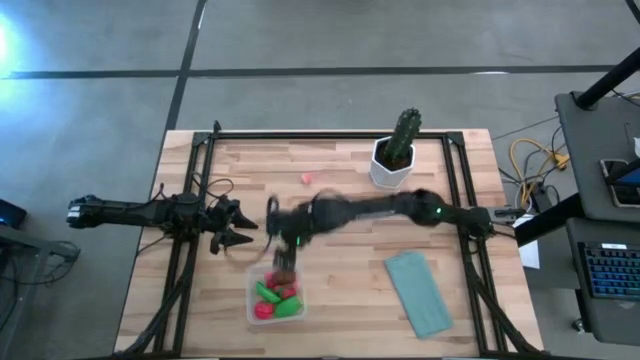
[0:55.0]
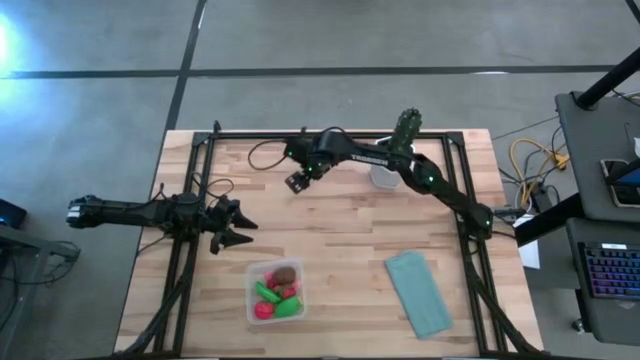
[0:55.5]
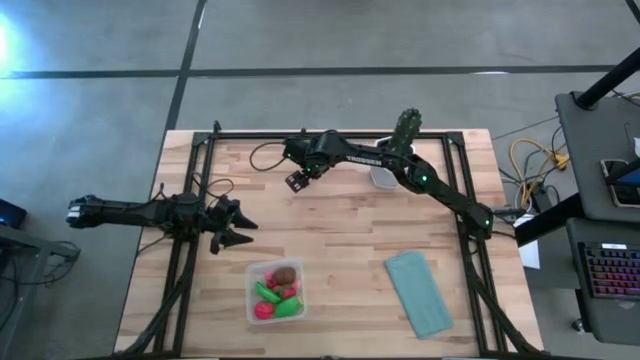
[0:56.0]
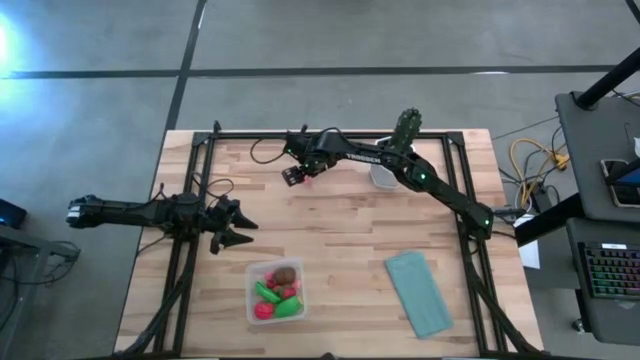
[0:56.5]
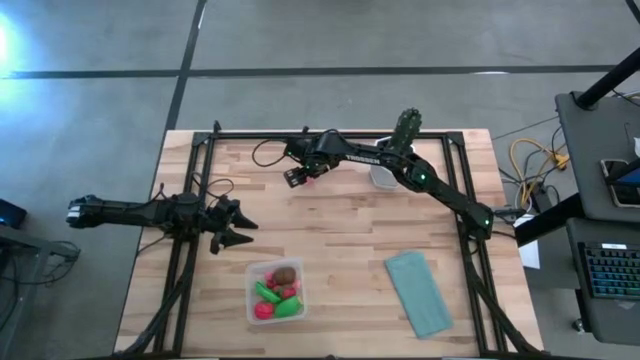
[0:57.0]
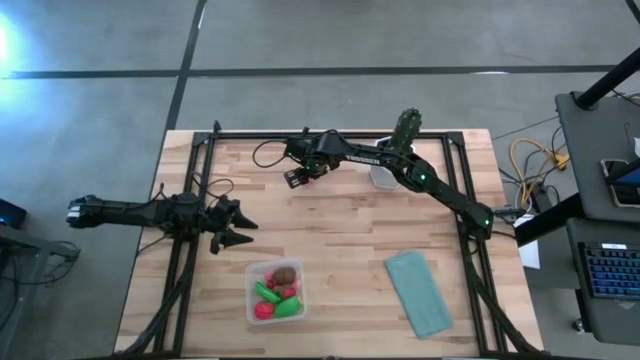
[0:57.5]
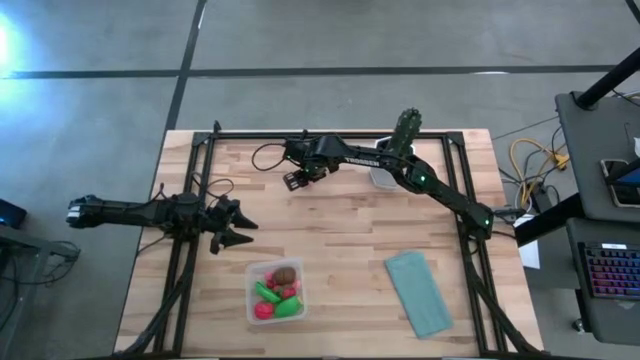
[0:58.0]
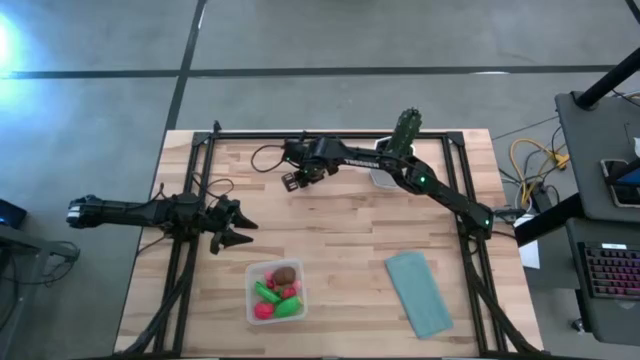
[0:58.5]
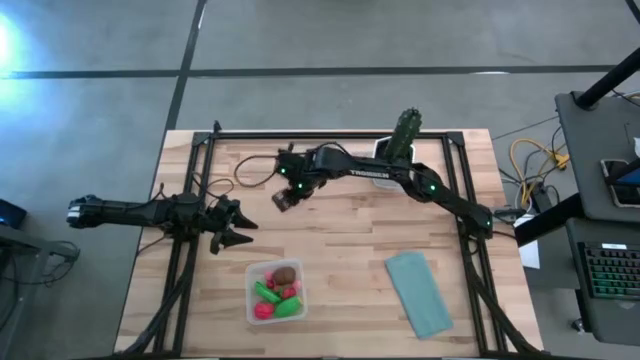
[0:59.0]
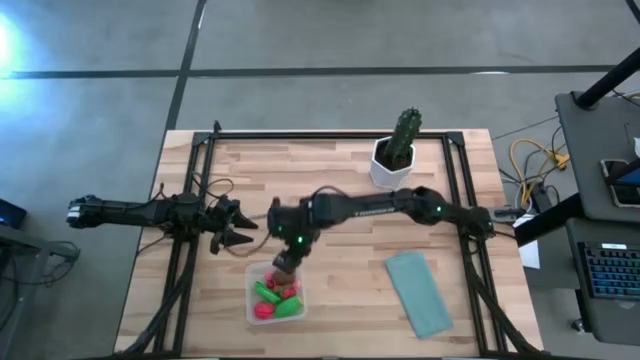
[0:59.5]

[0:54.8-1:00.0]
Task: Pick and placing Produce into tupperware
Put the pink peach into the transparent bin

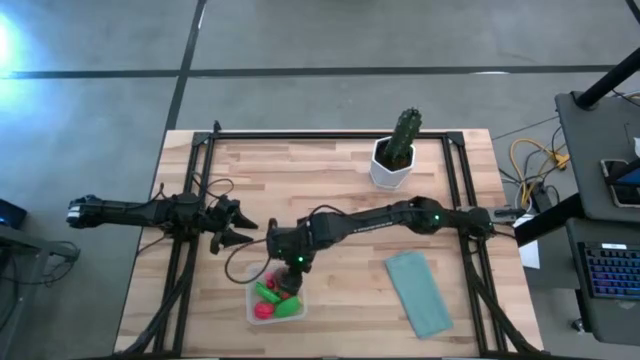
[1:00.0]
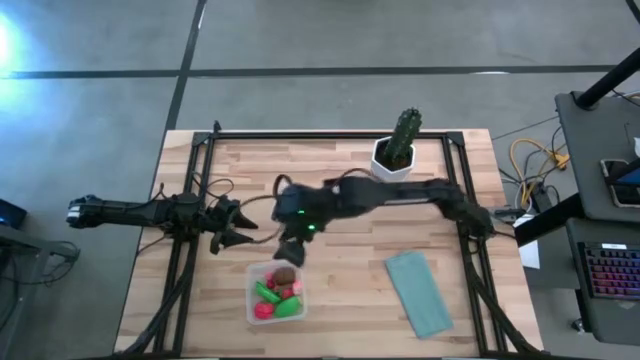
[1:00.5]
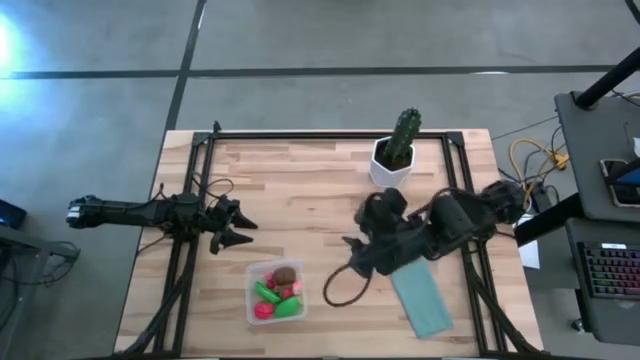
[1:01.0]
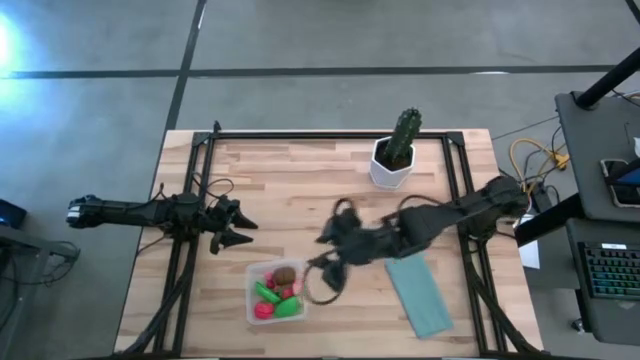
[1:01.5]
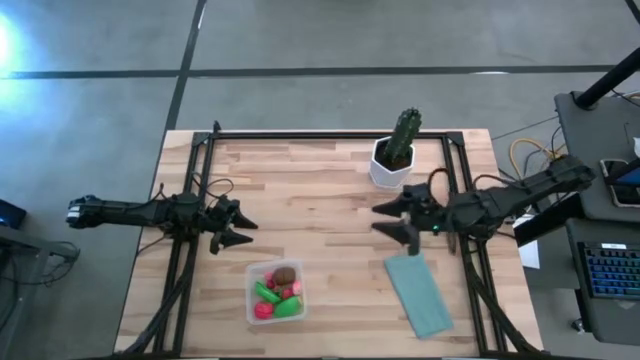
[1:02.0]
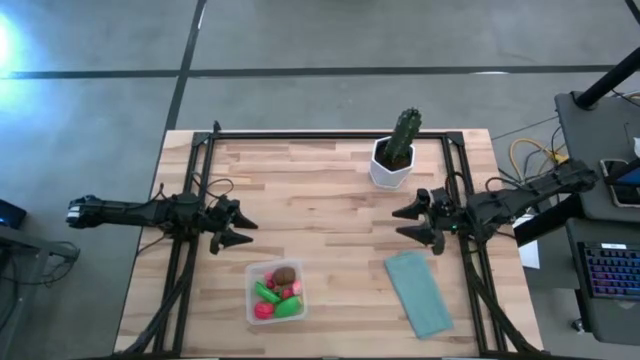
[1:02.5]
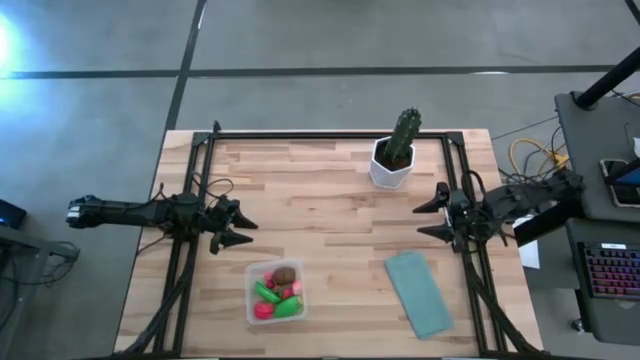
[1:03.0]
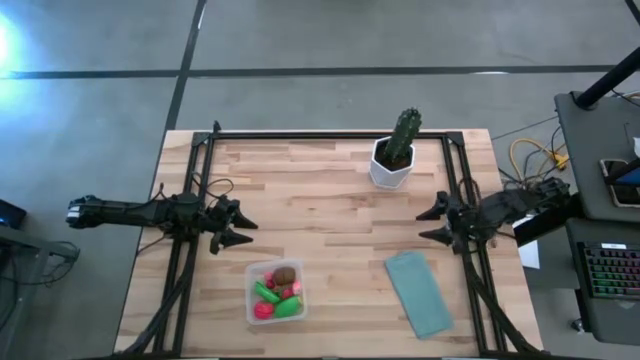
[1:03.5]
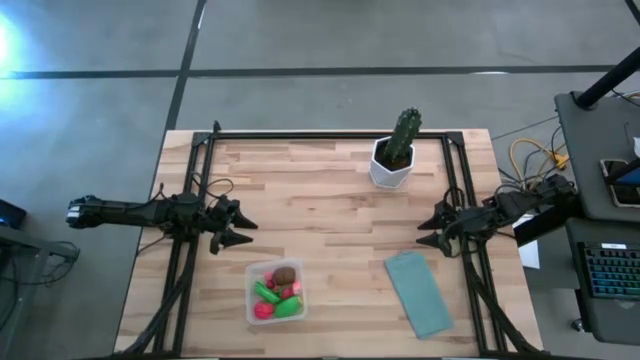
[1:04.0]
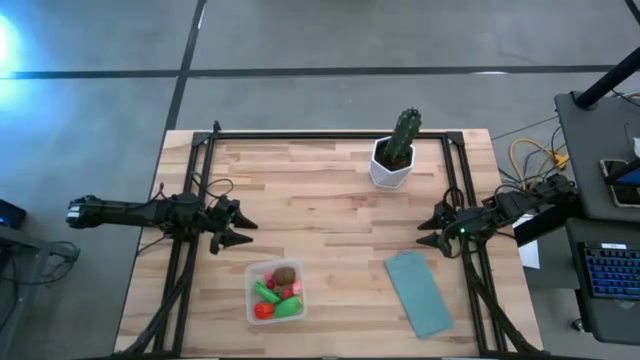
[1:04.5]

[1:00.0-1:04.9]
Return to Home Position

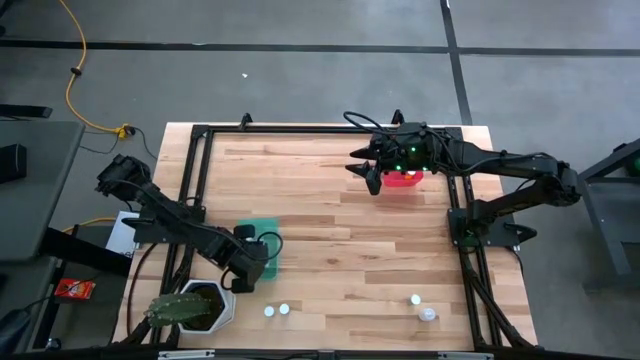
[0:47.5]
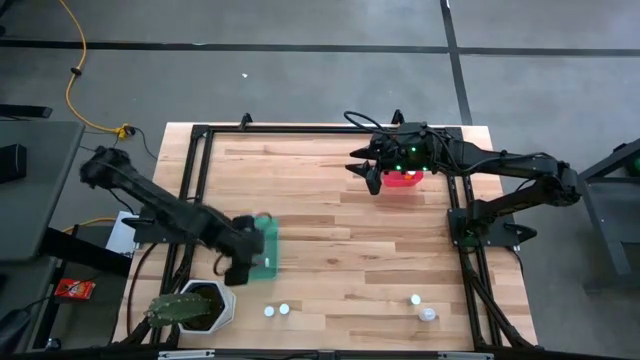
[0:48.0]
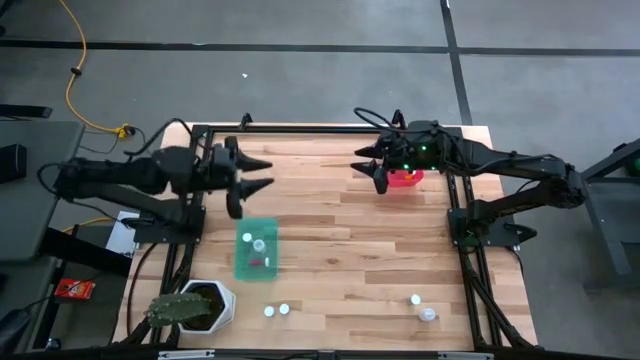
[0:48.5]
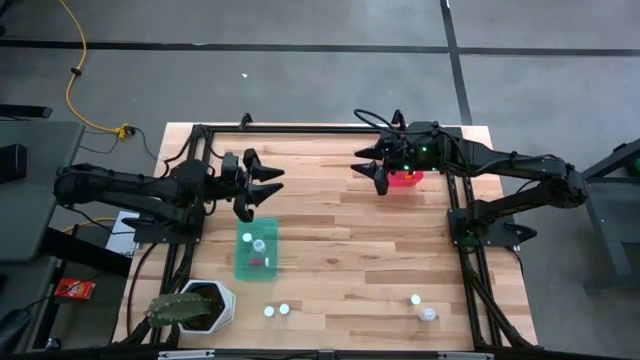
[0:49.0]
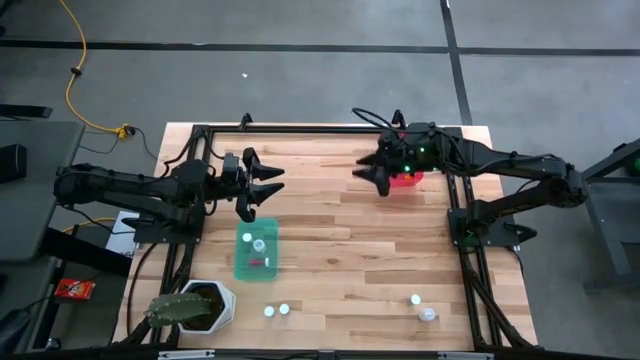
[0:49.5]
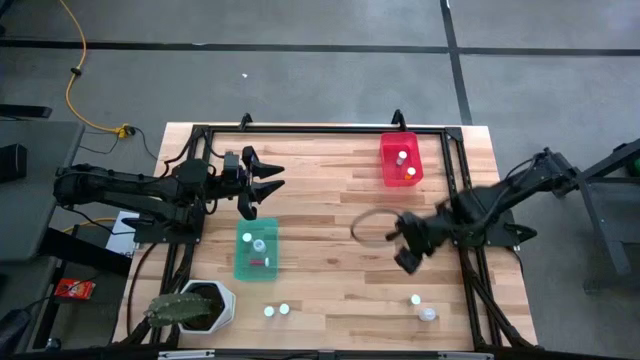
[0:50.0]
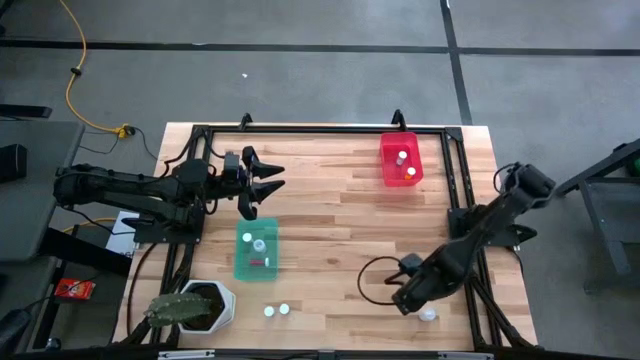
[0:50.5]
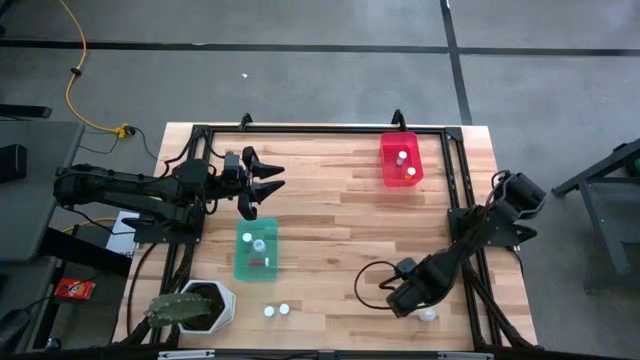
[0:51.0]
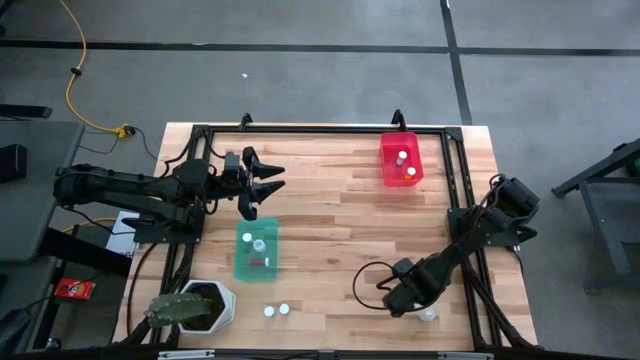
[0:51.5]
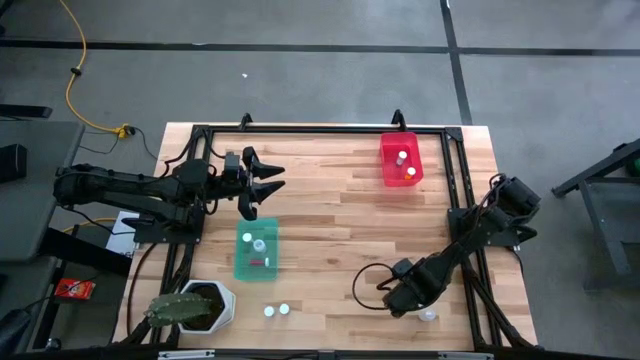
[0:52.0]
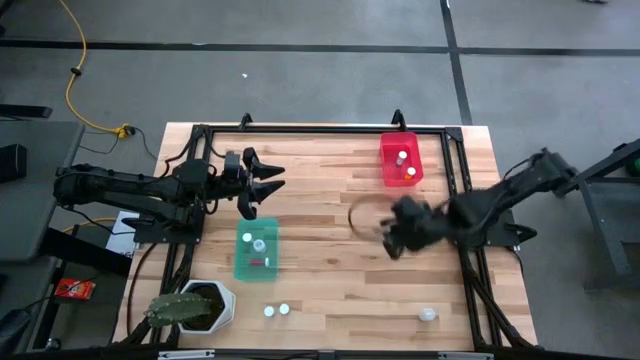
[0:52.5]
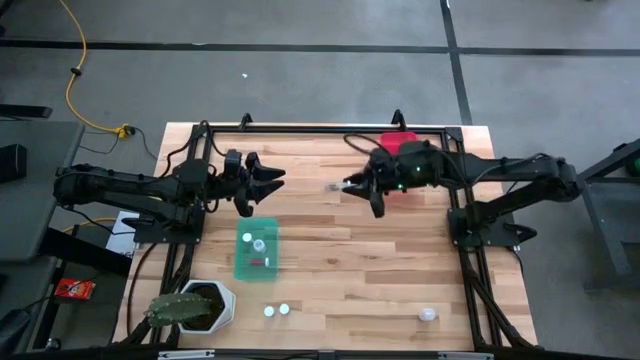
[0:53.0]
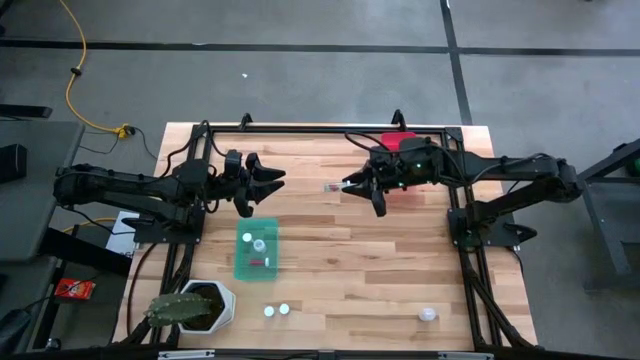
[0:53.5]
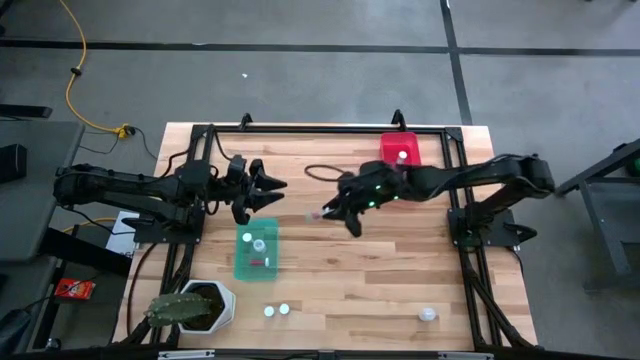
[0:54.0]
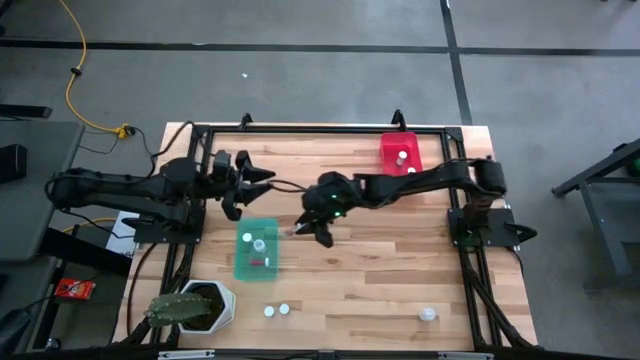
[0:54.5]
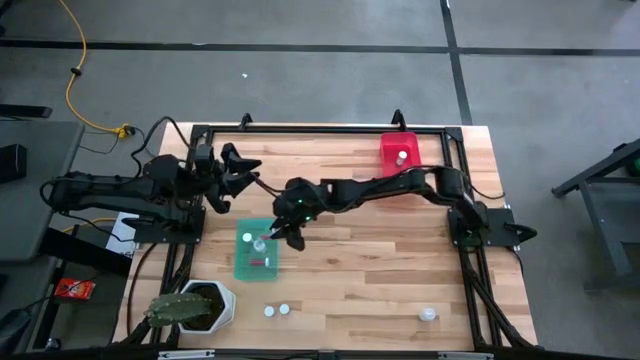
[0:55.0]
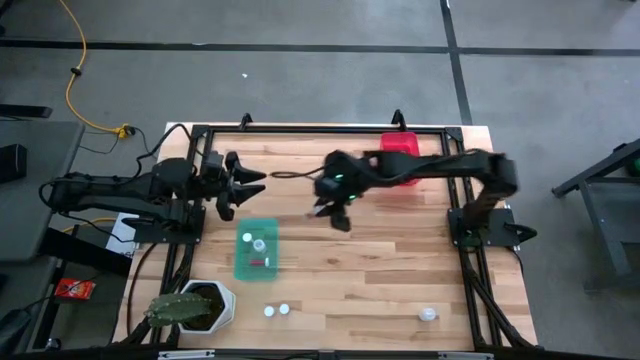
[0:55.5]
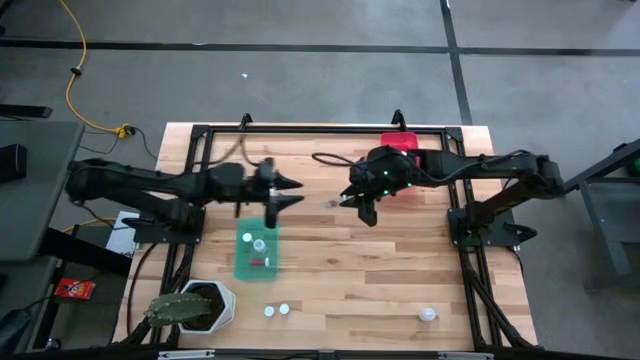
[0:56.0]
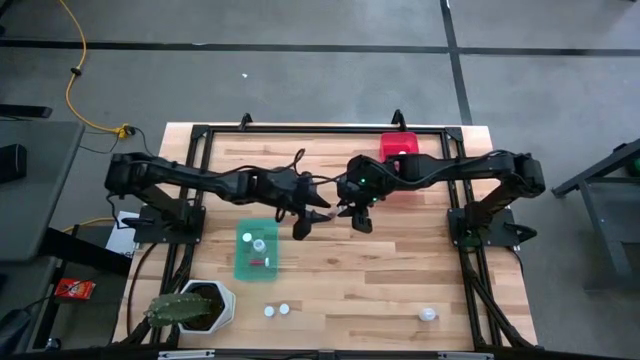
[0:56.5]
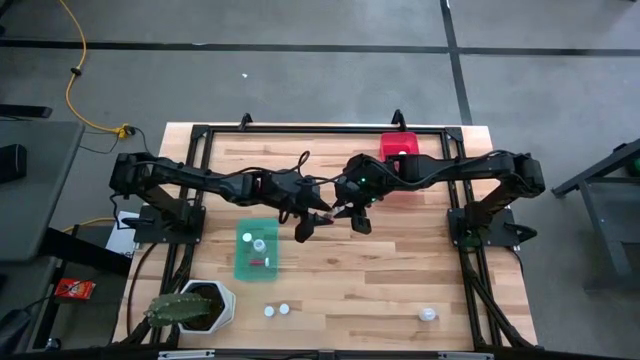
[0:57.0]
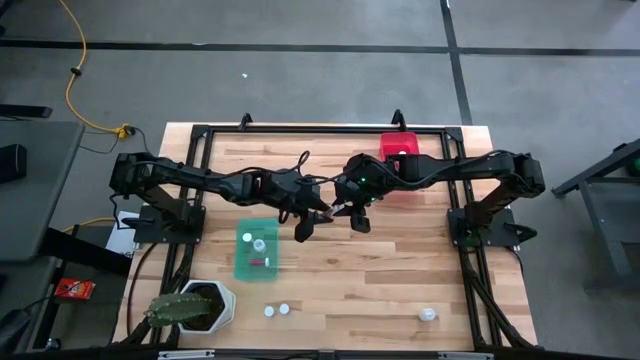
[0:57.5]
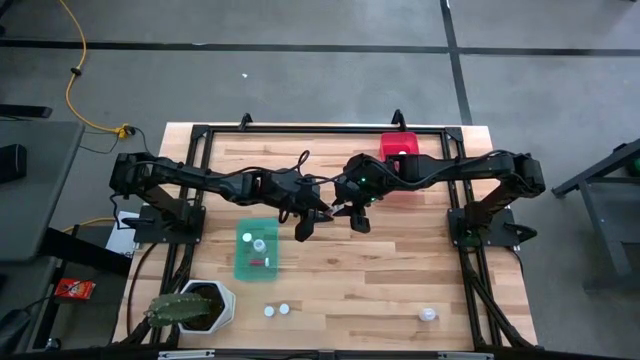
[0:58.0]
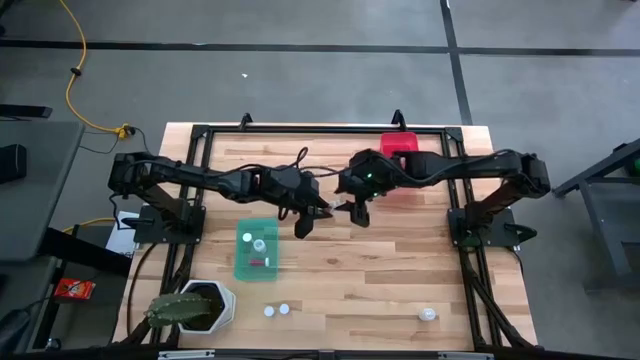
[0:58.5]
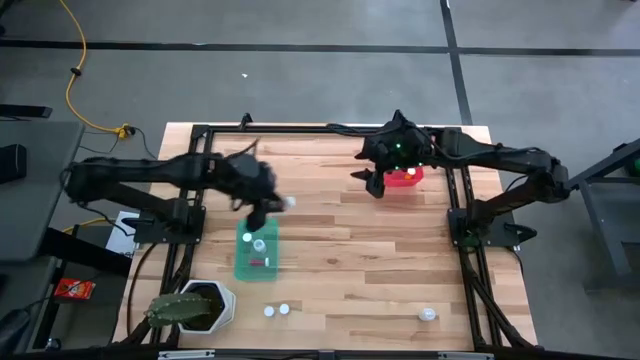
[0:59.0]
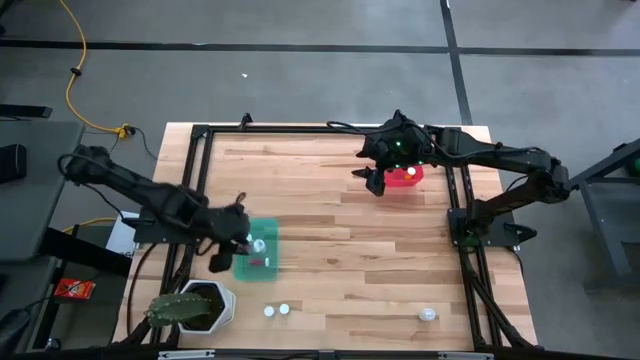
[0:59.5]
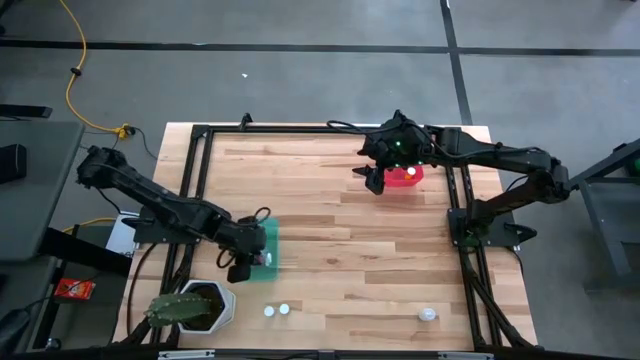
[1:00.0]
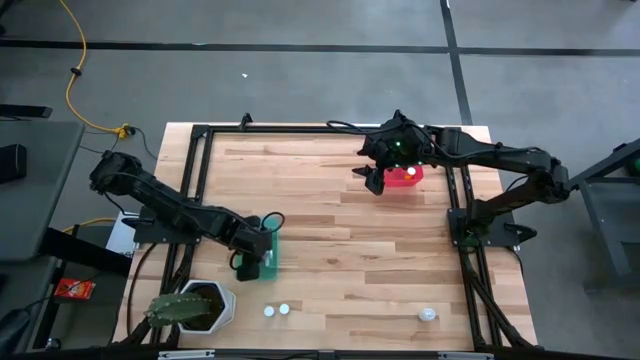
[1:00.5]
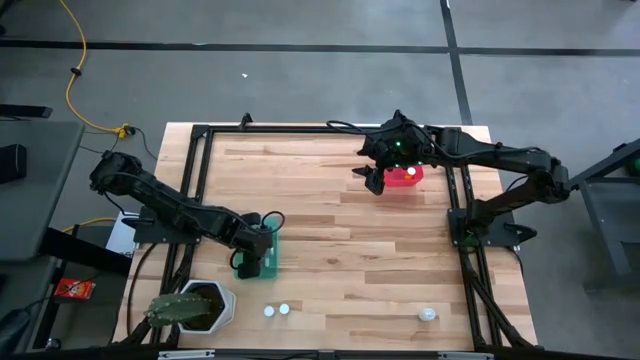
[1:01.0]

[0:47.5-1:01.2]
Task: Pick and place medicine bottles into bin by pill shape (circle, oval)
Put the blue capsule bottle into the blue bin
